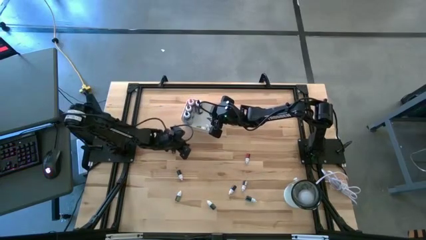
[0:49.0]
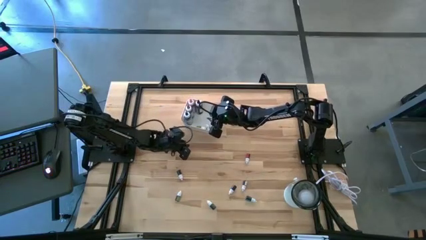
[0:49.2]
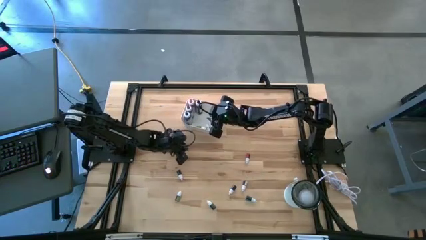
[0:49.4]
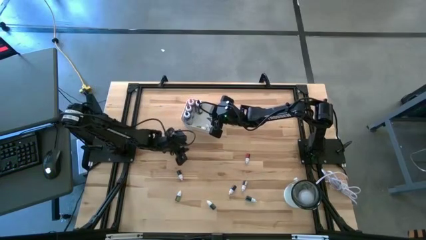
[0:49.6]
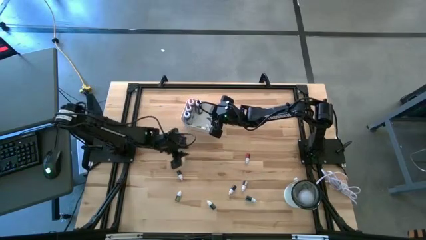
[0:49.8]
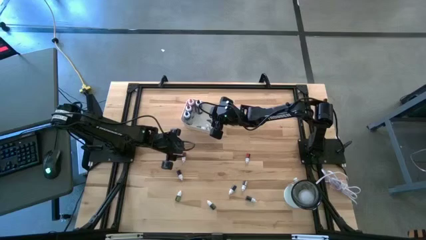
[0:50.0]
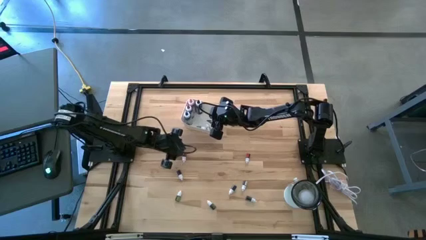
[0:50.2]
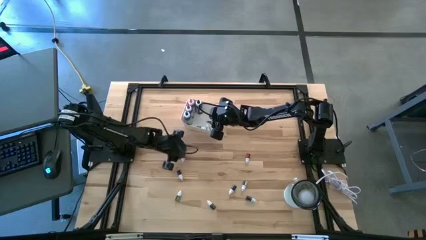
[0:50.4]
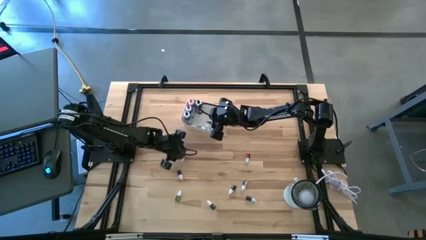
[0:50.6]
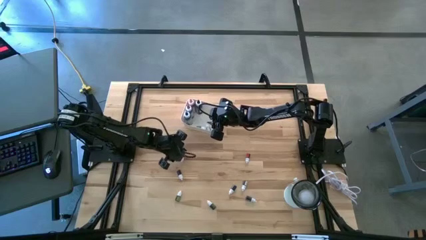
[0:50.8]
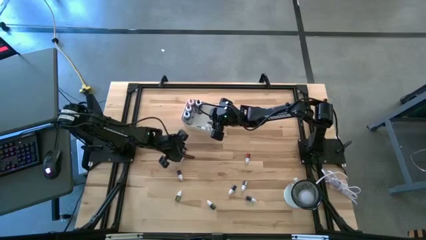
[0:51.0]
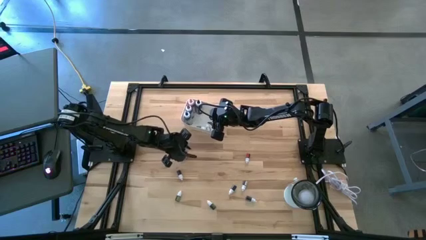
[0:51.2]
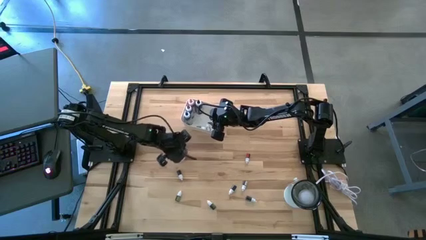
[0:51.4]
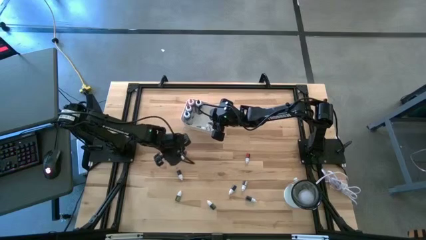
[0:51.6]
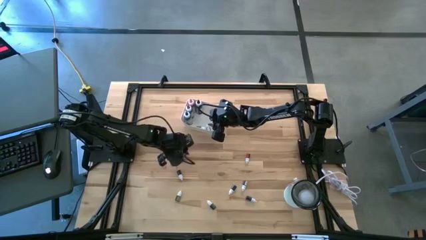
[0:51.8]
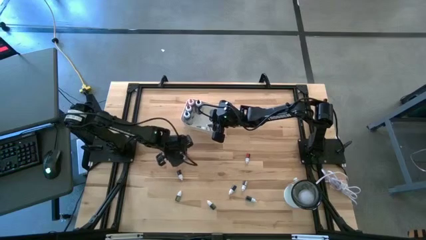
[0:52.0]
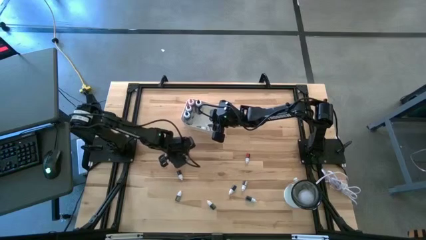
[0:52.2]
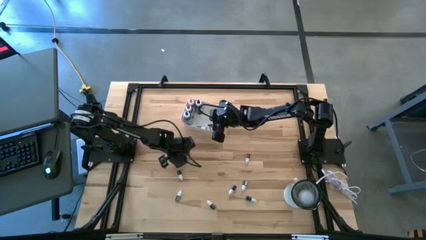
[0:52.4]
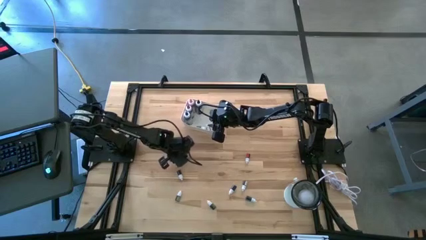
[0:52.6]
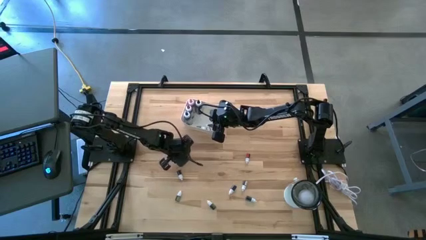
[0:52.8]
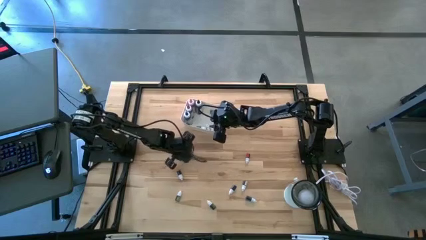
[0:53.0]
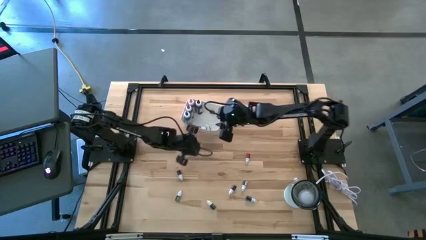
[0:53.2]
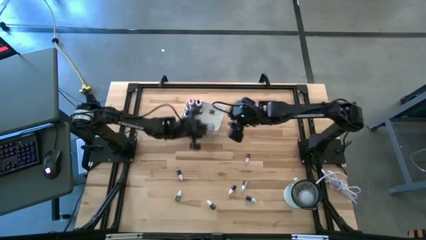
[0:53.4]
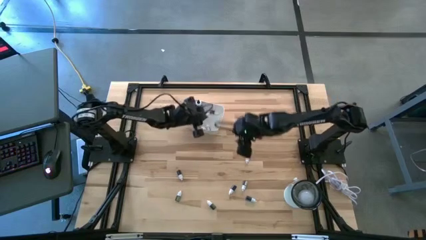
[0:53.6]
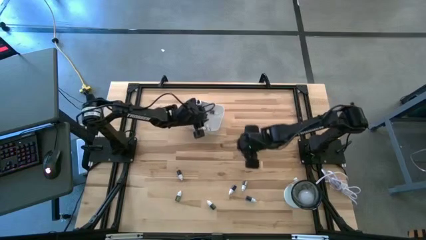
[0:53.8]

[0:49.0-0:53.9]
Task: Pick & Place food coloring
Put the small top left red food coloring bottle into the white bin

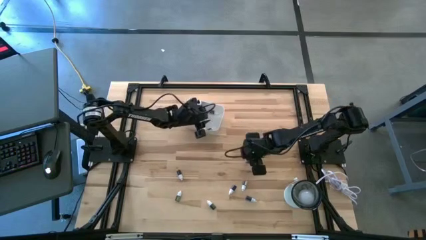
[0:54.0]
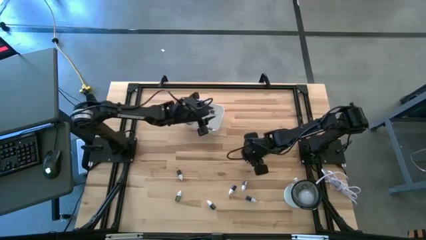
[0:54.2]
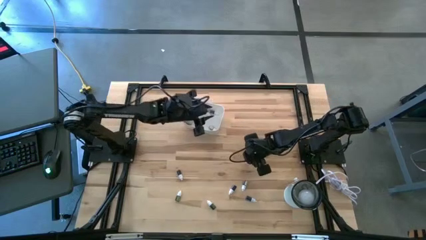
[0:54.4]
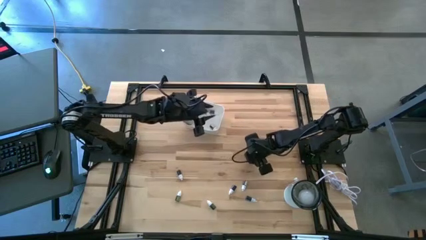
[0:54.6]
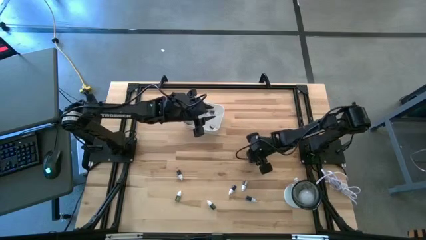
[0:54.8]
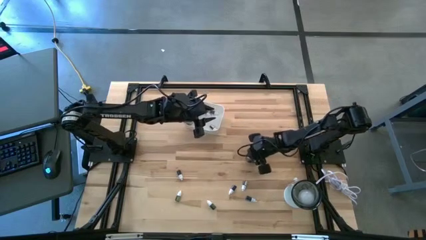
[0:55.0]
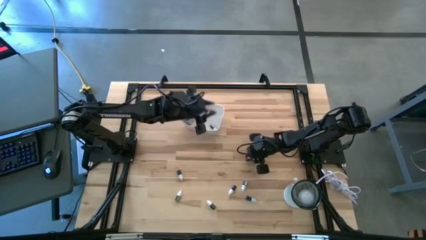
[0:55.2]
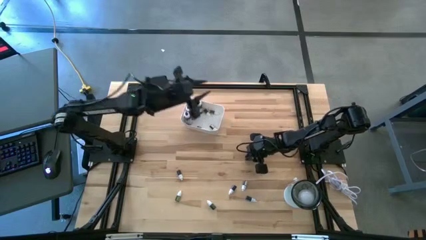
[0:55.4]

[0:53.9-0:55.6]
Put the small top red food coloring bottle into the white bin

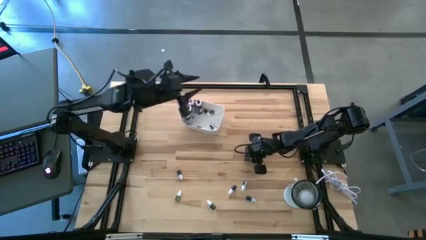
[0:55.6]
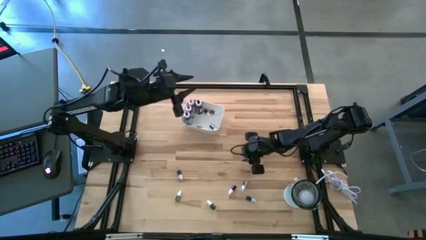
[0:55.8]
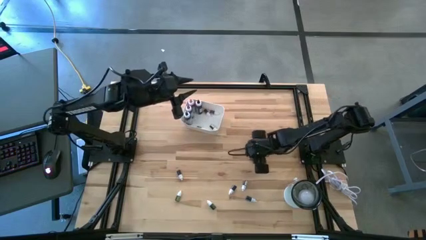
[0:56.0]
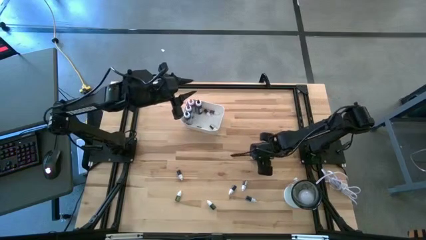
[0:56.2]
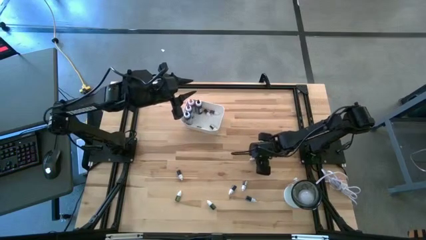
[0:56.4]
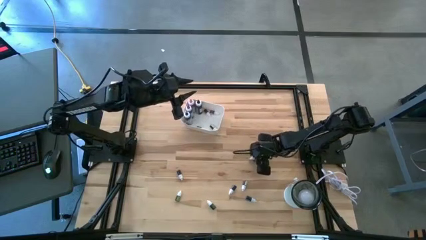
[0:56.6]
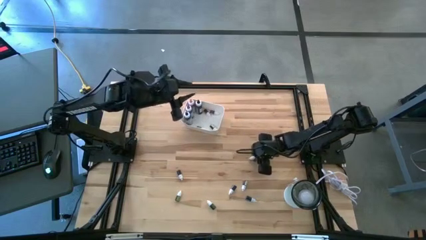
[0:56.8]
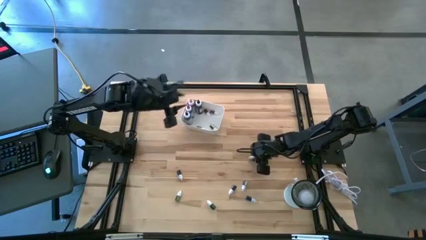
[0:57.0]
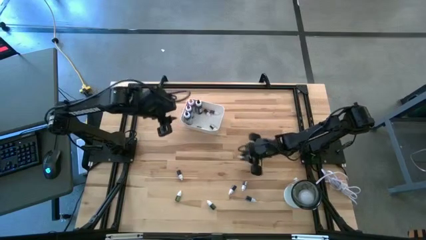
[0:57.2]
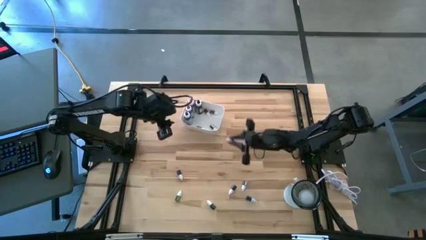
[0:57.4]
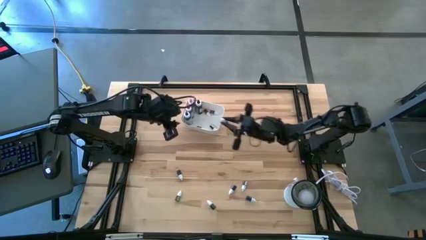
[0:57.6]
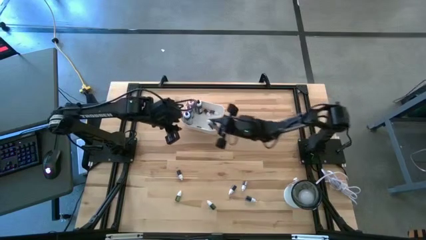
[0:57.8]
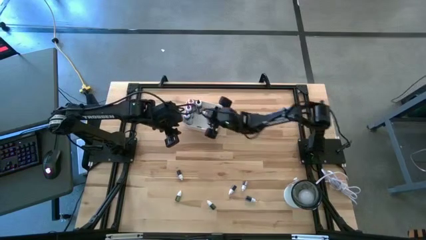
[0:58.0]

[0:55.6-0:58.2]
Put the small top red food coloring bottle into the white bin

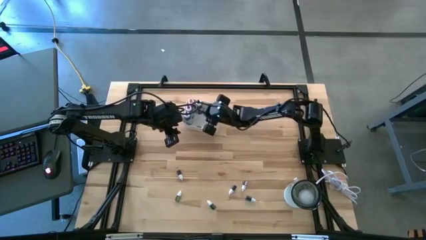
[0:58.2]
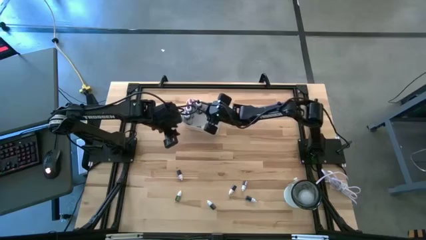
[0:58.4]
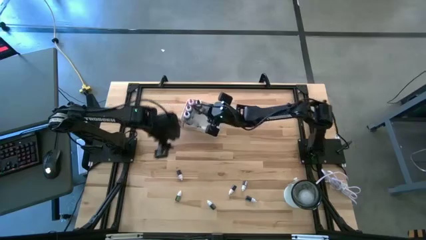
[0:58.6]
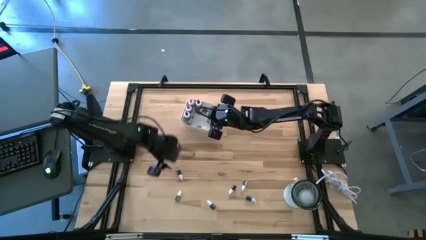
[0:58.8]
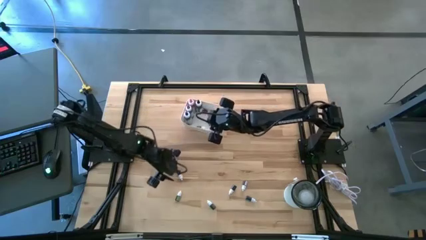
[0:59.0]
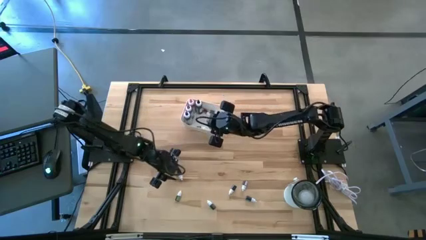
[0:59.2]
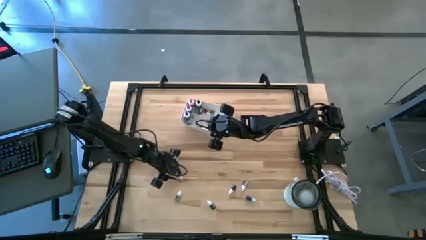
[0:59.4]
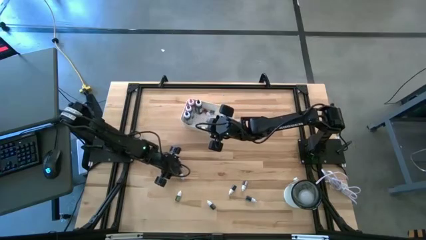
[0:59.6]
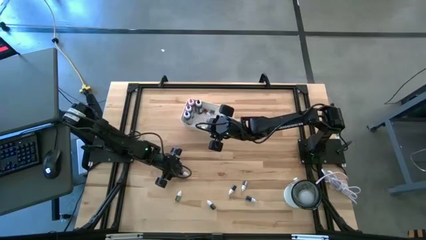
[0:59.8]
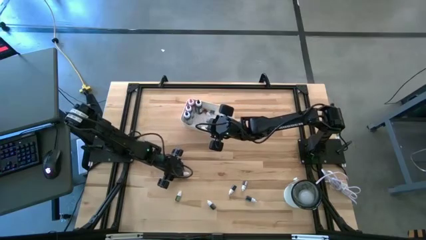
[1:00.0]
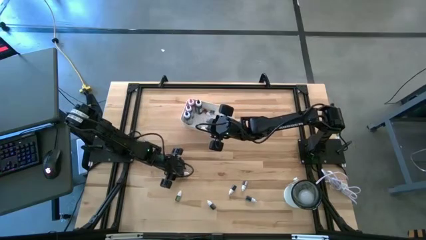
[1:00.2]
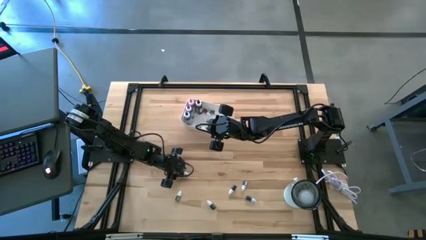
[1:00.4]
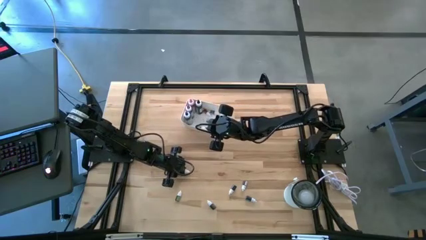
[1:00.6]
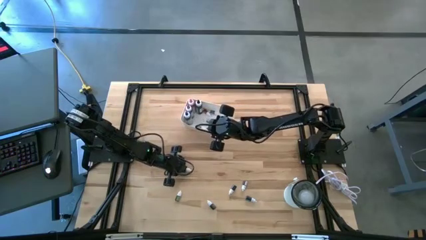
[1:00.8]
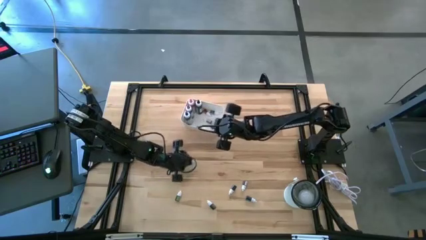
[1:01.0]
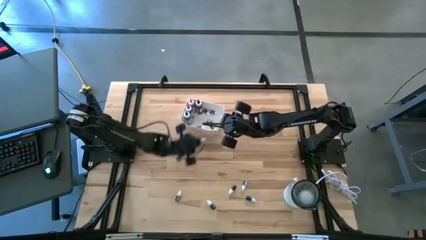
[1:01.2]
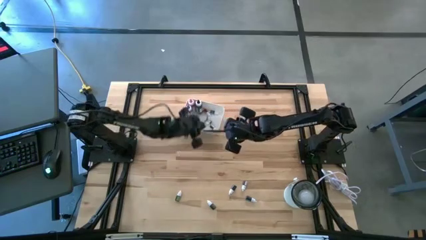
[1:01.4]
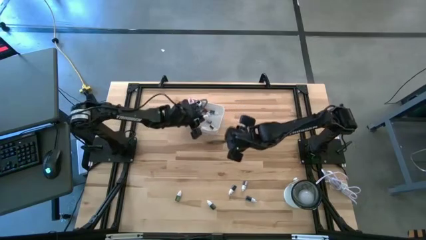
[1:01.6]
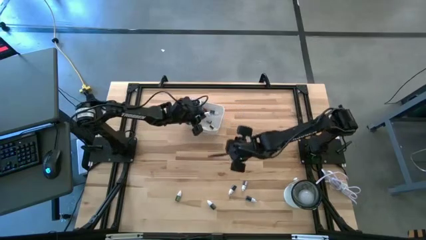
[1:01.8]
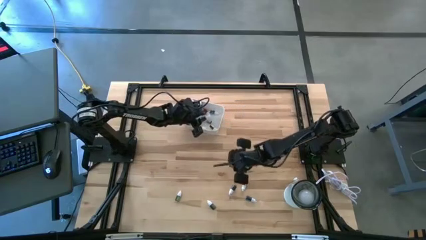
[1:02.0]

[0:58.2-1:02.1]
Put the small left black food coloring bottle into the white bin

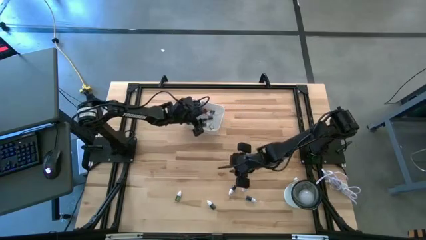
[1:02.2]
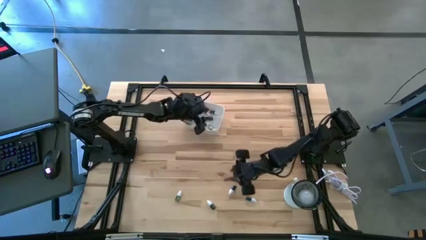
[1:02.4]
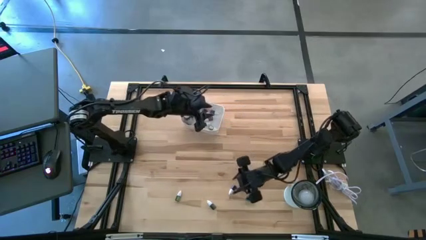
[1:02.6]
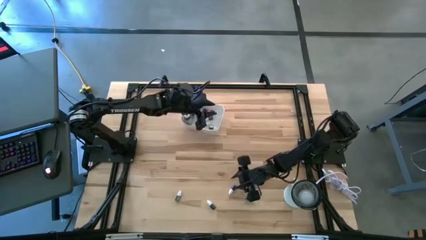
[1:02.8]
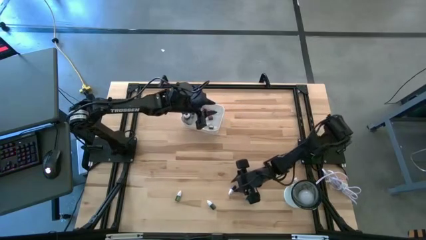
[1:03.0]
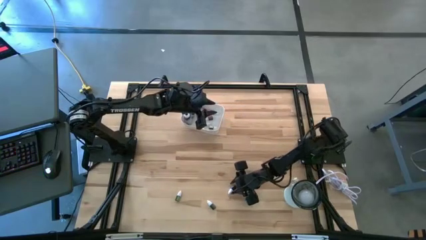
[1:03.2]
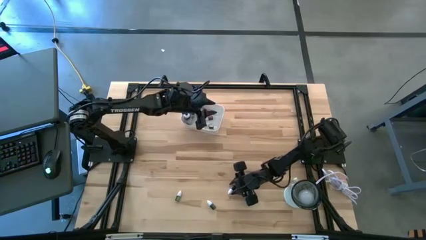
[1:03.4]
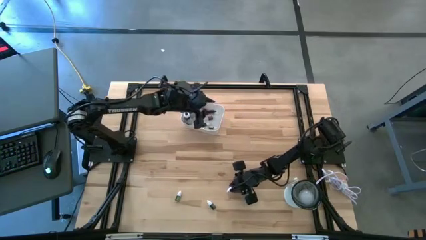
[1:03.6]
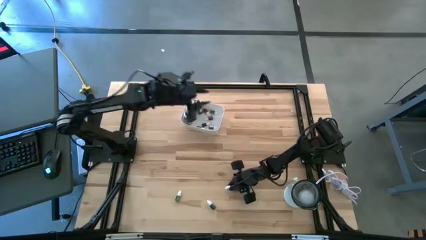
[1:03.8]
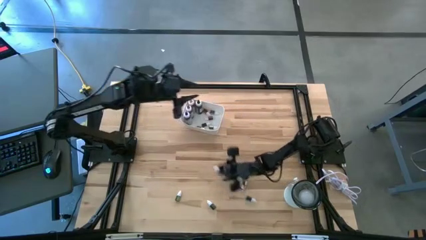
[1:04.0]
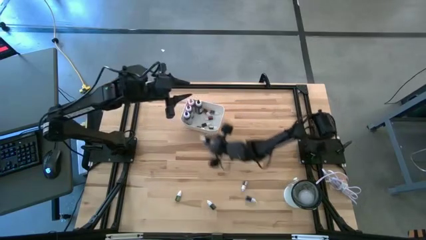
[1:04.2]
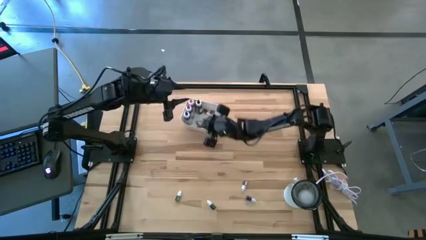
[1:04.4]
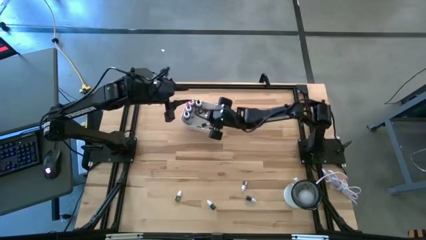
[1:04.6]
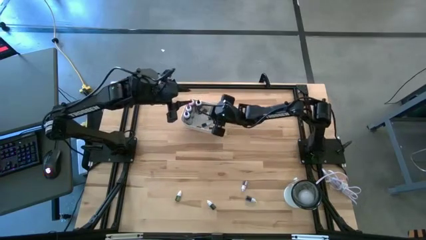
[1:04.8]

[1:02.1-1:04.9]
Put the small black food coloring bottle into the white bin

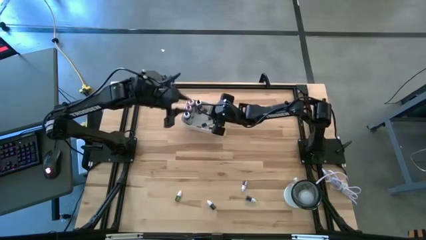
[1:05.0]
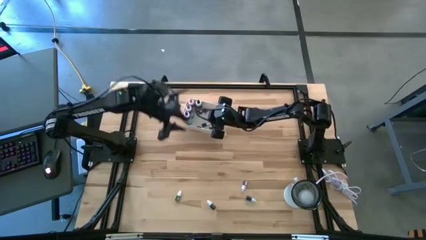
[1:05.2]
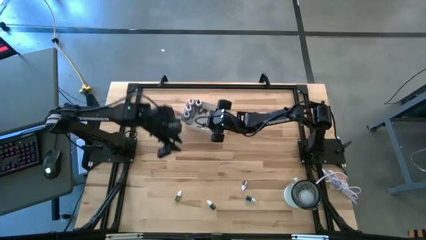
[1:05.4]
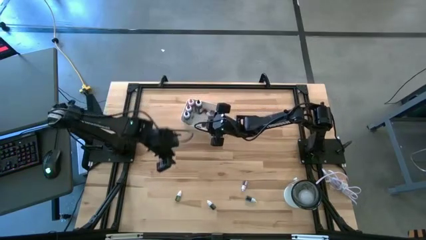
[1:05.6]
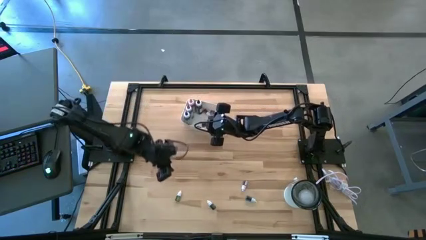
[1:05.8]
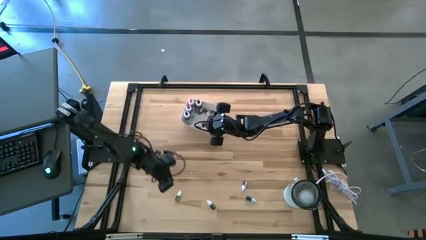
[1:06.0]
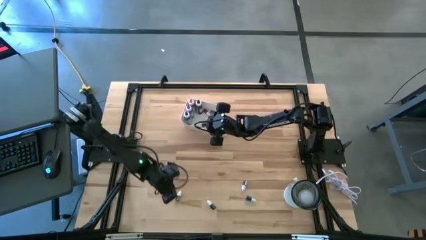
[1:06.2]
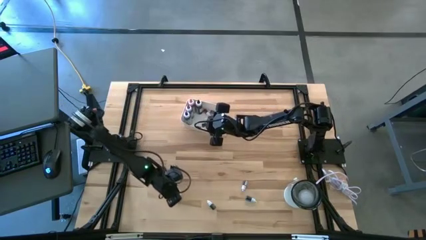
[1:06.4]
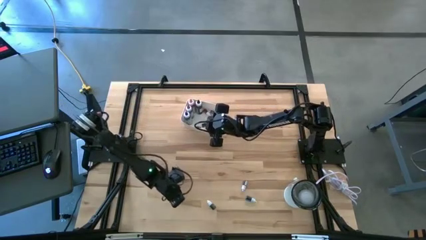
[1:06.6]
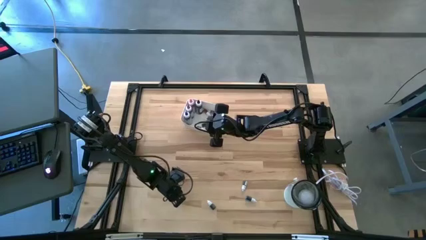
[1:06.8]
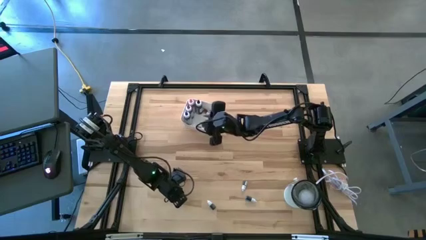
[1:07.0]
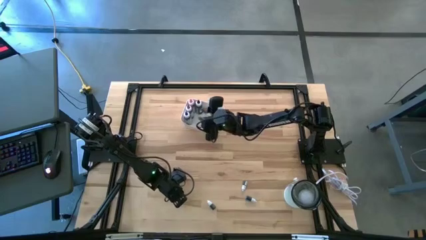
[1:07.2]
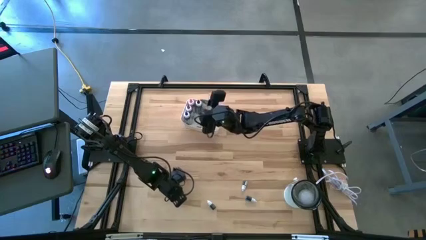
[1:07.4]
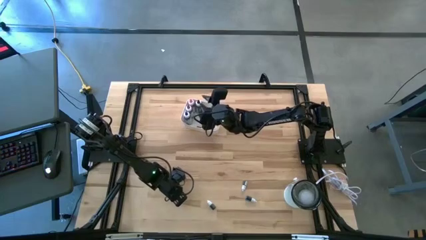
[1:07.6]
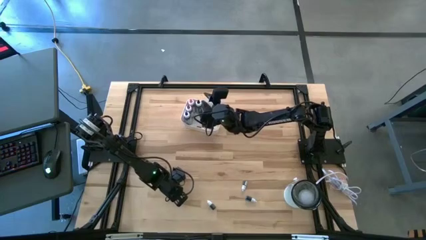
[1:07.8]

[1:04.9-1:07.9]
Put the small left green food coloring bottle into the white bin
